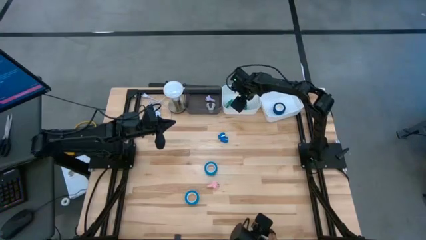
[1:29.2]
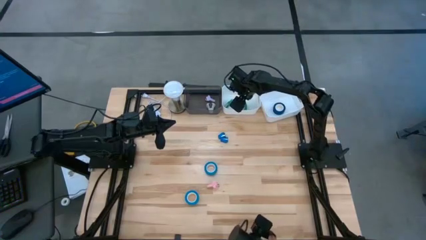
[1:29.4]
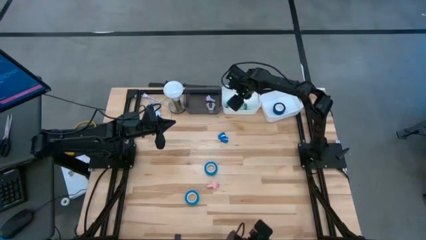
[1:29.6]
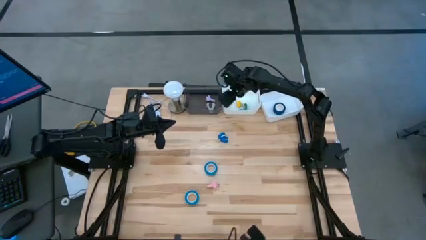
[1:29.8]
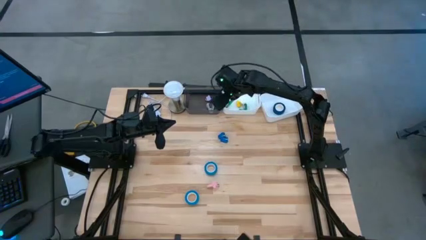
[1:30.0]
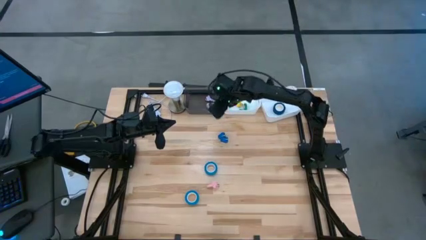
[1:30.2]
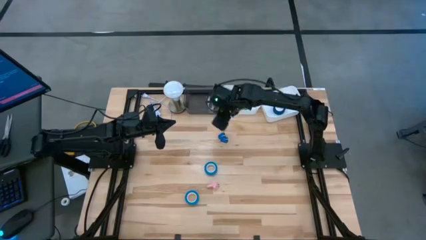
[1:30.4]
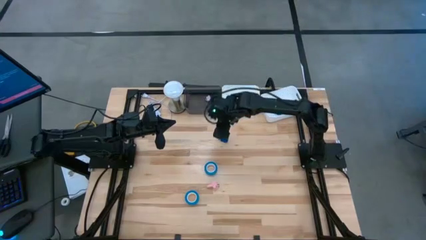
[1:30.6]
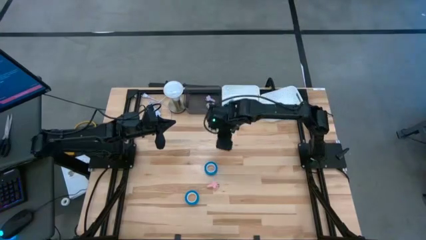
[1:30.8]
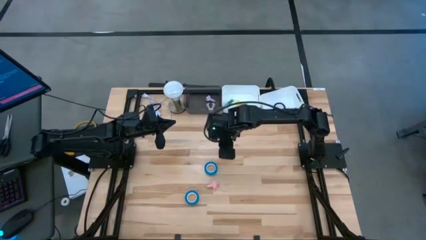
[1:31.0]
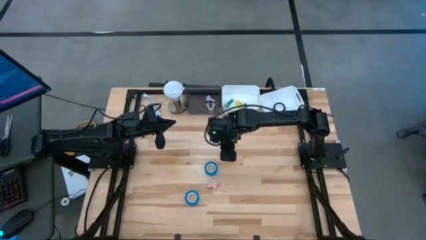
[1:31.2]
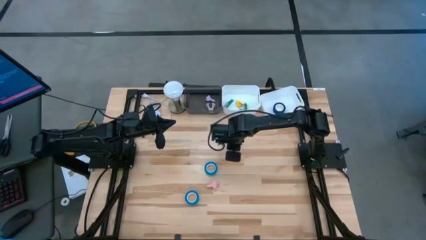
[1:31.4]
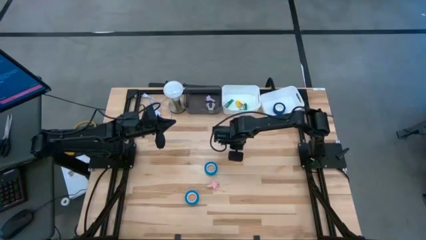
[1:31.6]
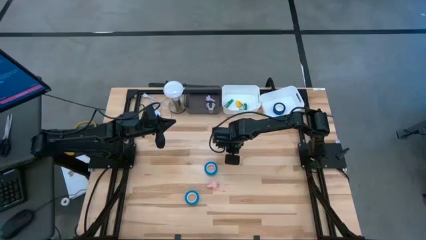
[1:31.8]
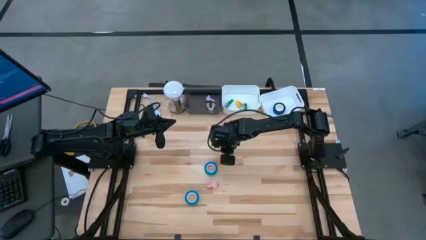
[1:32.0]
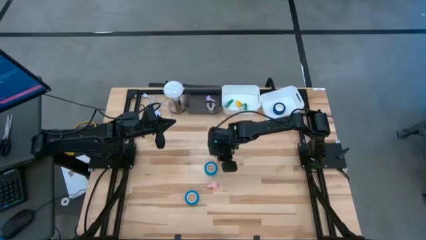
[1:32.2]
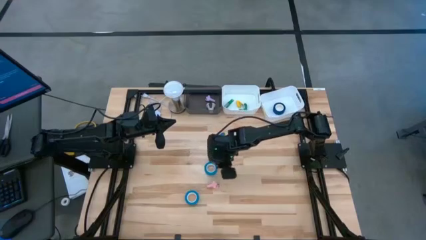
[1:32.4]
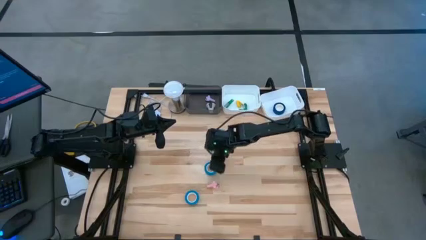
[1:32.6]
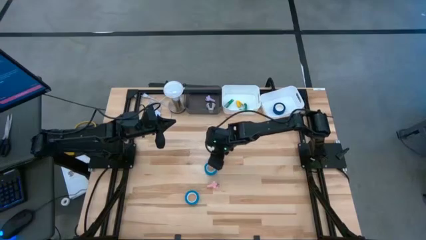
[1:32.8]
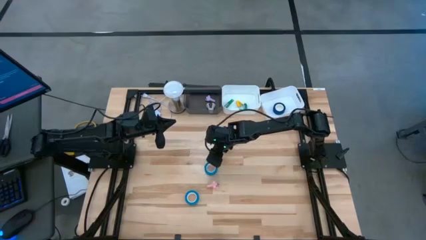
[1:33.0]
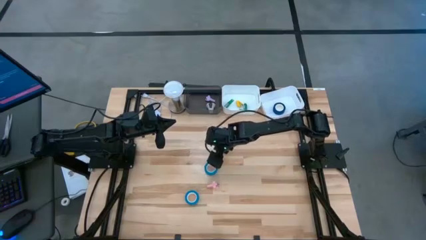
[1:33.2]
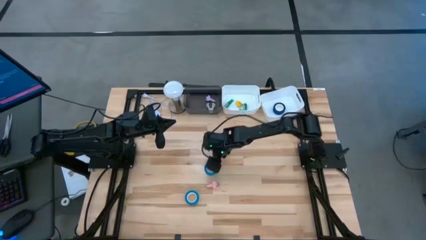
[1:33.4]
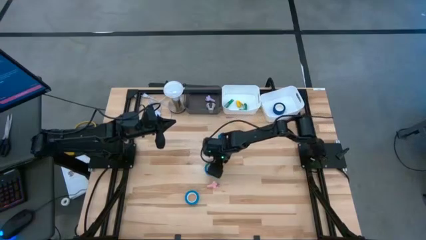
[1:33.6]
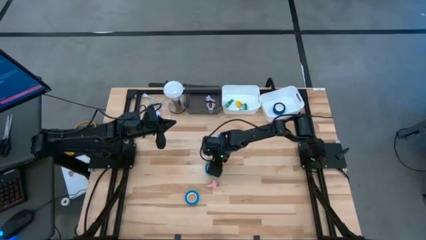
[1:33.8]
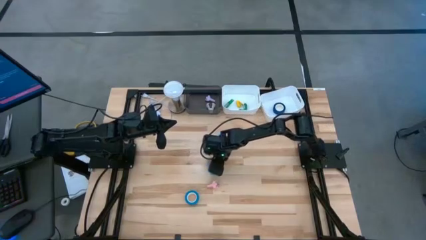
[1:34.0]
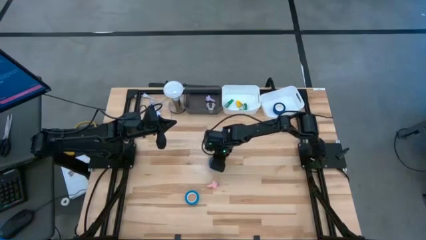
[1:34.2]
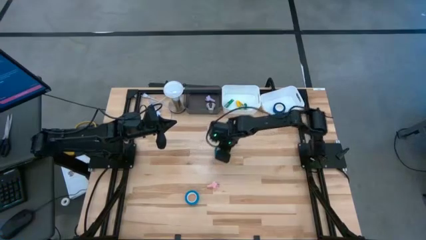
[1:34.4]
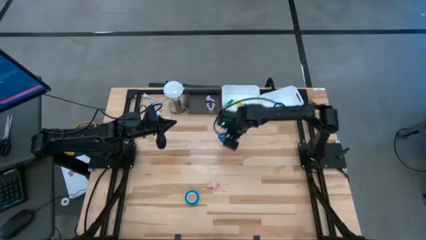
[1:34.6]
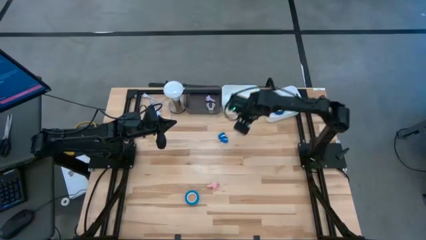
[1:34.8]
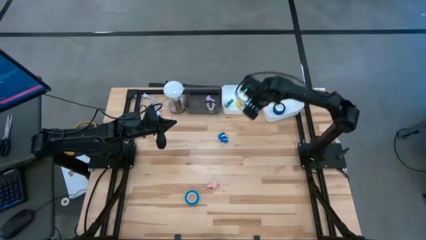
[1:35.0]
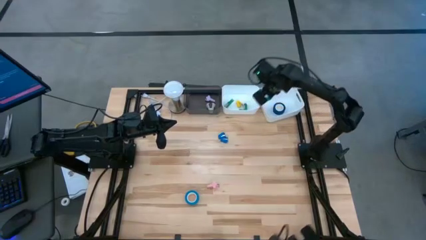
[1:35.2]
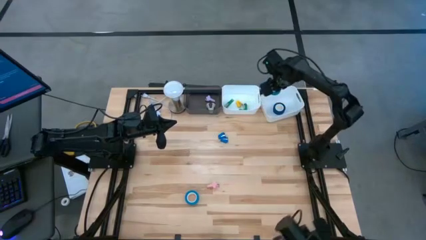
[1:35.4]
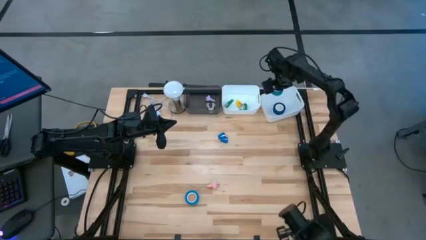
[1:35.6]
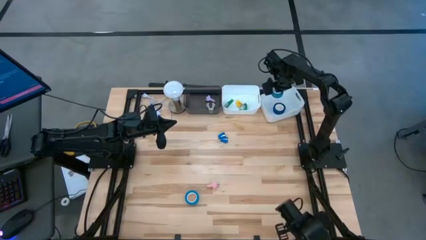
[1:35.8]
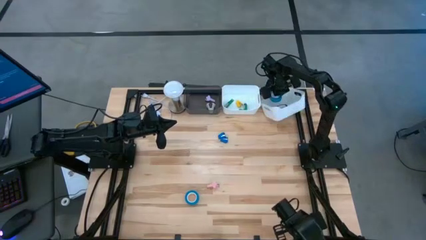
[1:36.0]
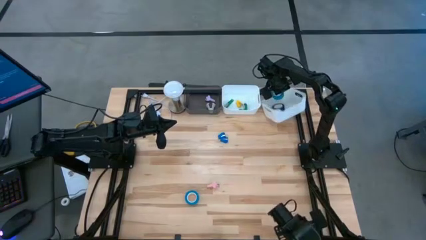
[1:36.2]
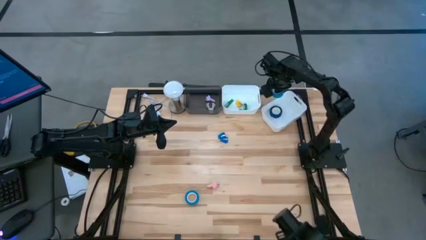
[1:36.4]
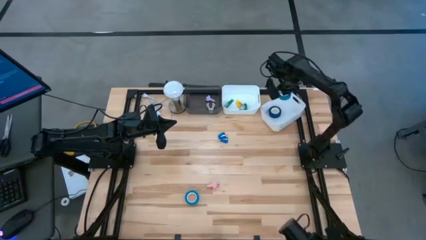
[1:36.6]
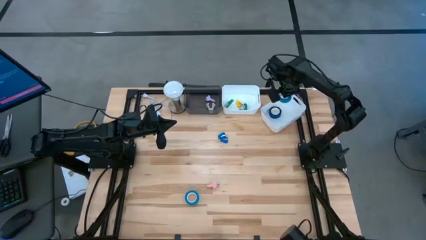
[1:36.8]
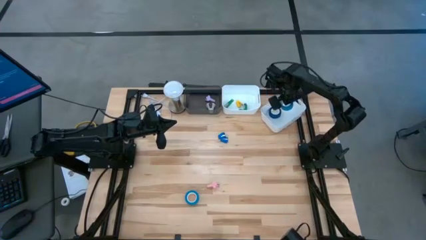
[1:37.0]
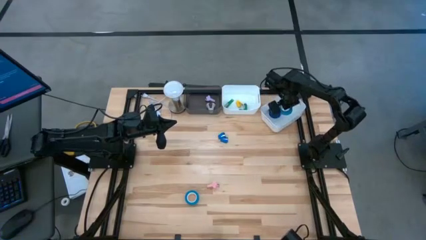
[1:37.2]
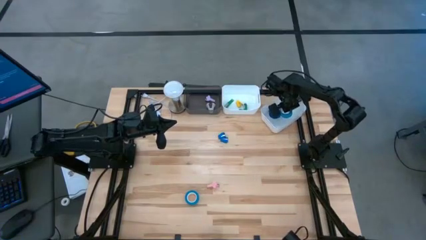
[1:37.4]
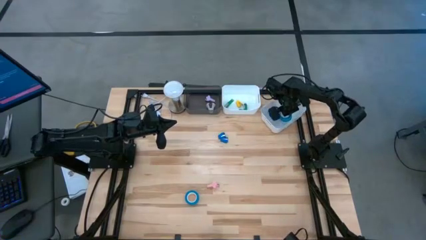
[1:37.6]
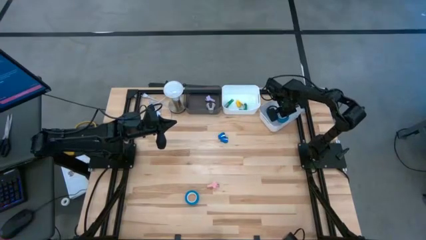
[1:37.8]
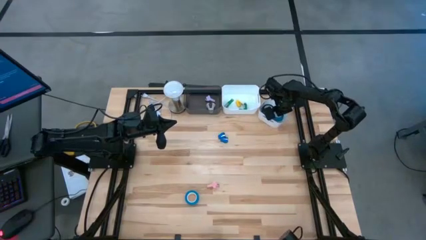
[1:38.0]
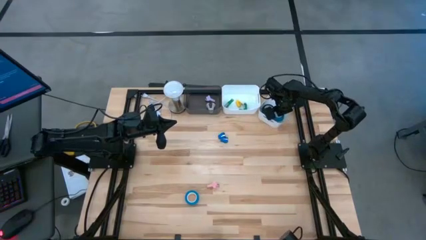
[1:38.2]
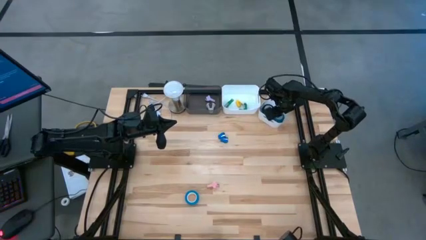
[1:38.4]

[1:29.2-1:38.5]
Task: Pick and place Stapler, Stapler remover, tape
Put the top light blue tape into the right white bin

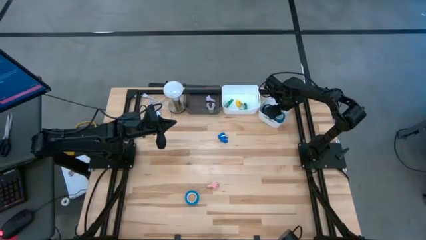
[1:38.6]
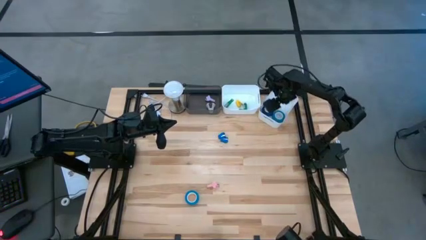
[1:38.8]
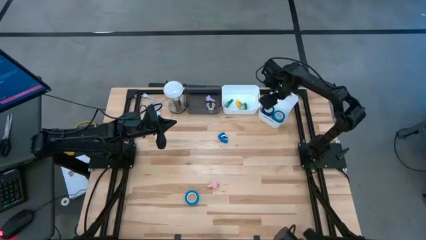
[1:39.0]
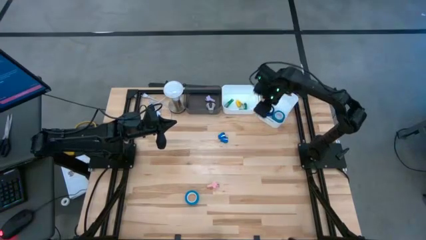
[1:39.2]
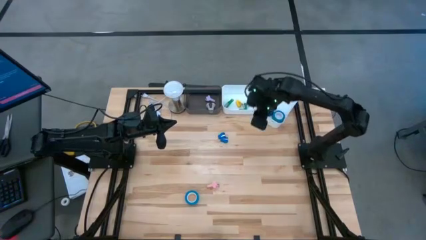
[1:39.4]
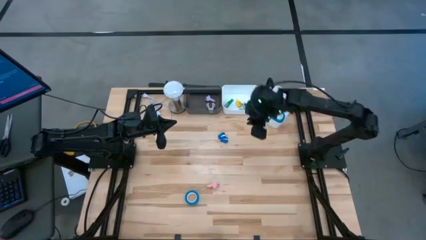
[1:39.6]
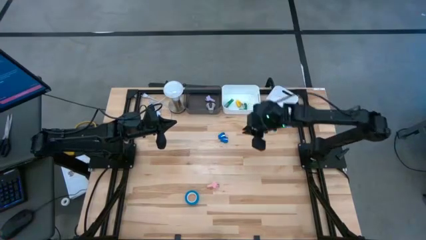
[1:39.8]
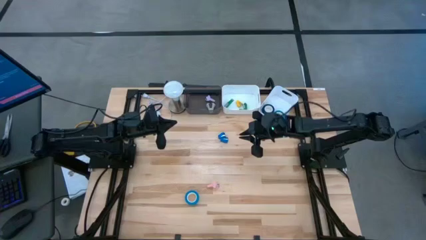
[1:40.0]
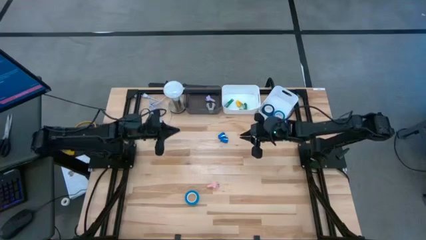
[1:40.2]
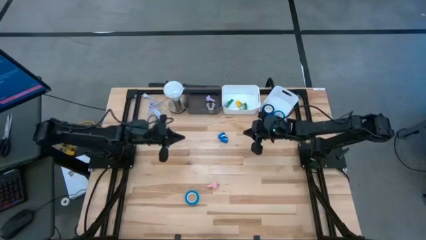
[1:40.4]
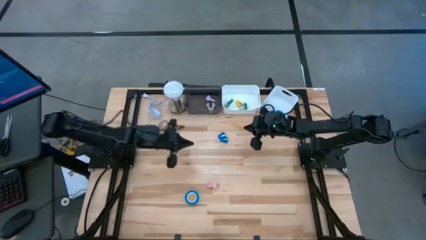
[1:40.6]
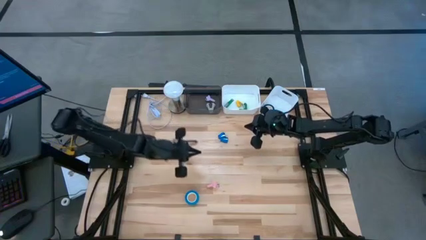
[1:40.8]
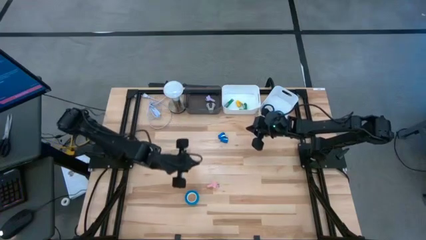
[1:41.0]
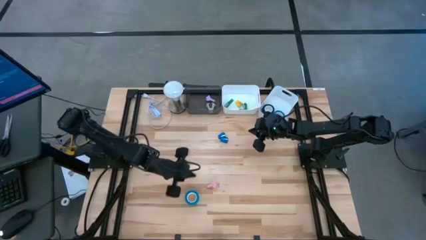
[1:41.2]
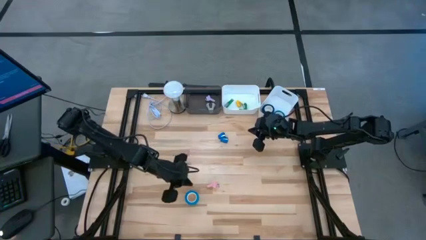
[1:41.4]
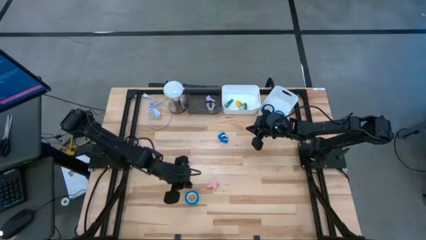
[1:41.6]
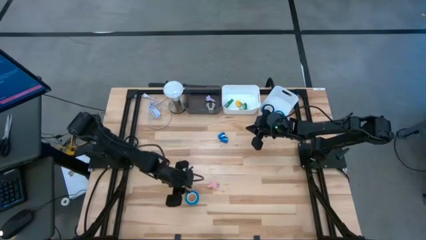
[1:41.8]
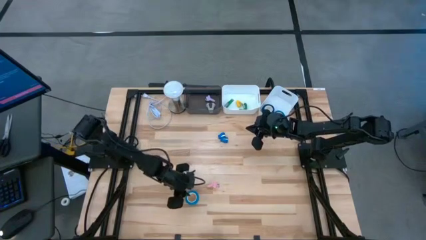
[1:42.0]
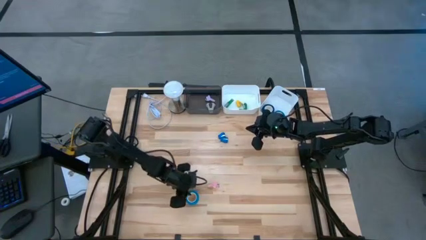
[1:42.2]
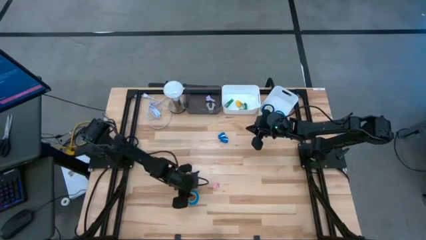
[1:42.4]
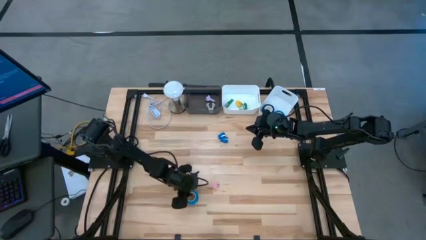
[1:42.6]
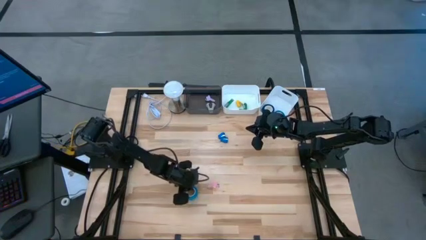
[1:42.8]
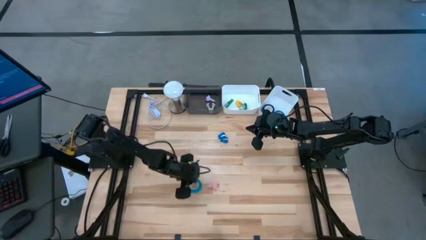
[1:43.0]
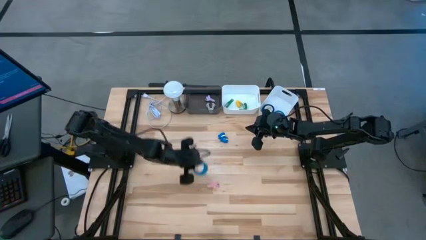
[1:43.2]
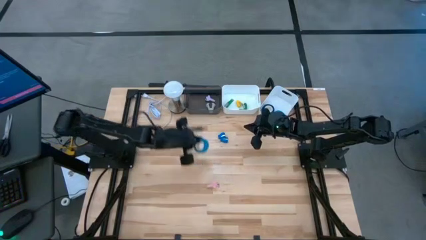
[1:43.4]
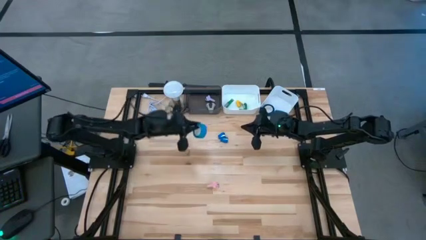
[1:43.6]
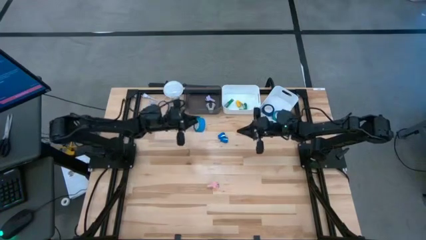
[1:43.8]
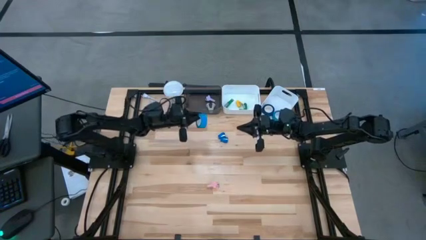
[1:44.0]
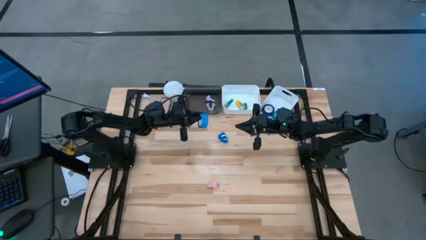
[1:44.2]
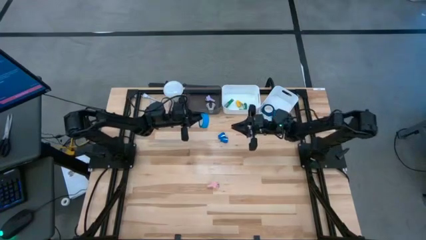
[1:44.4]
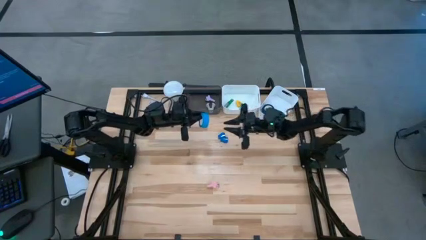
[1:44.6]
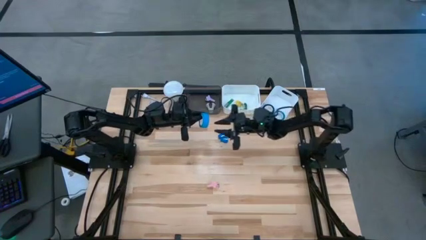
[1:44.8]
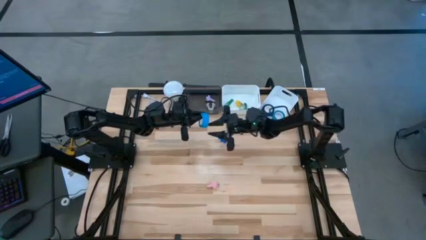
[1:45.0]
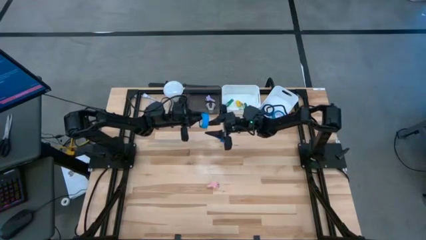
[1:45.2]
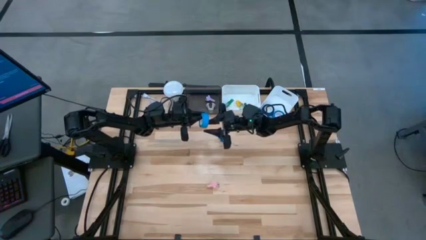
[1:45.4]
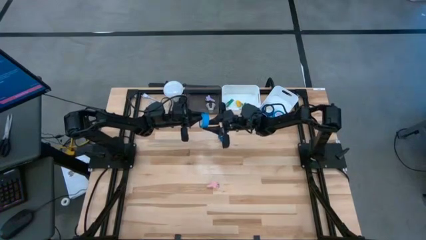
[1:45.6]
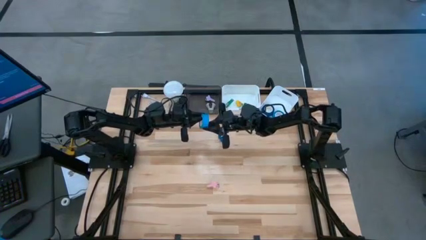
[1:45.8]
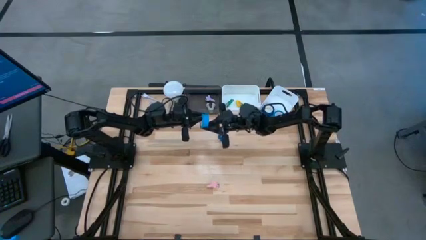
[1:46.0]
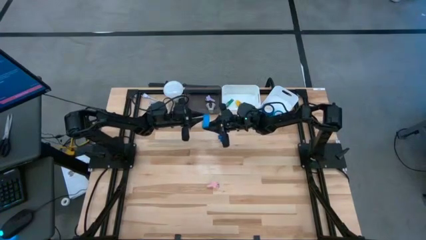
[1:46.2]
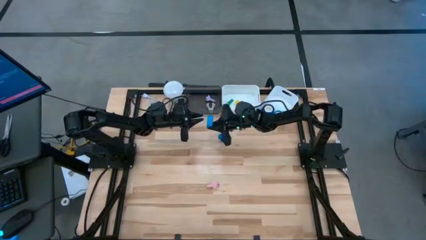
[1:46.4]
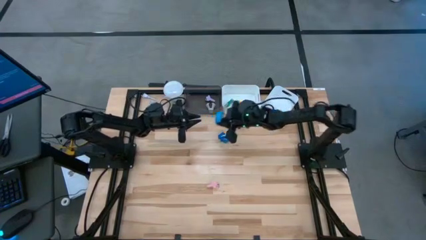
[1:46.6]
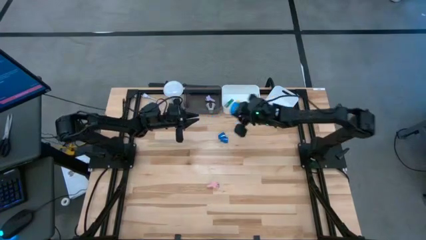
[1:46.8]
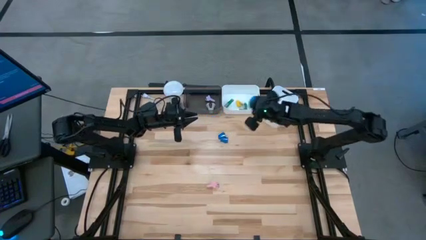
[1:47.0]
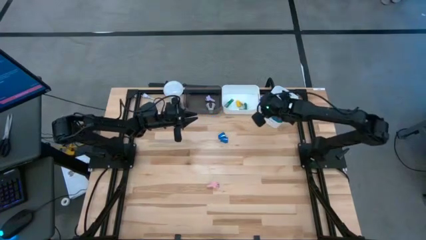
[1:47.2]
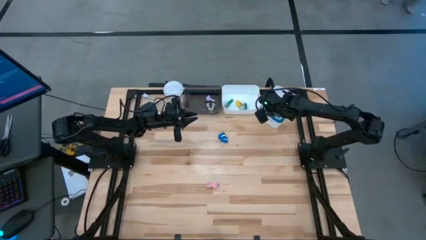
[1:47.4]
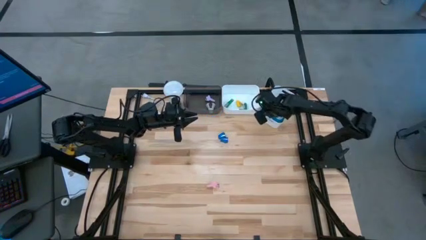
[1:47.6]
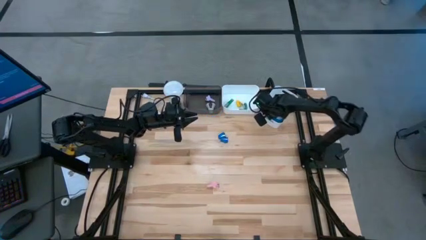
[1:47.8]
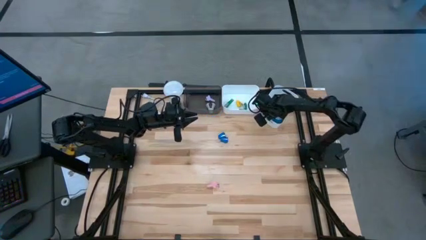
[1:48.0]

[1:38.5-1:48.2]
Put the light blue tape into the right white bin
